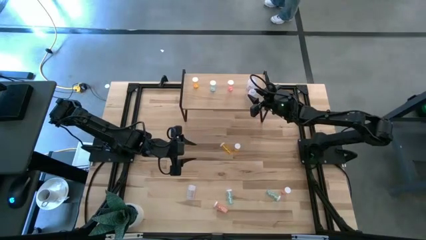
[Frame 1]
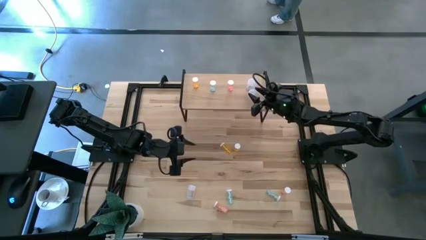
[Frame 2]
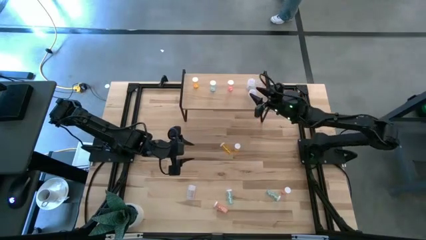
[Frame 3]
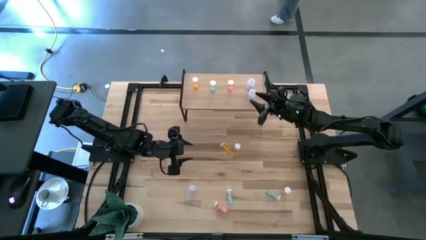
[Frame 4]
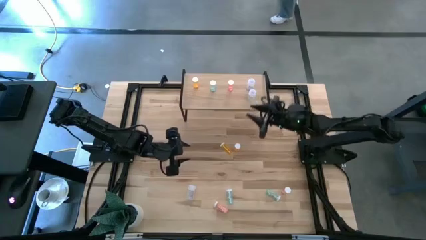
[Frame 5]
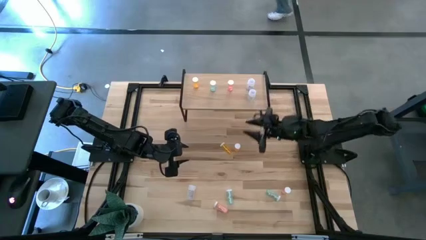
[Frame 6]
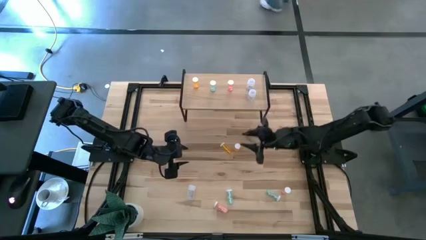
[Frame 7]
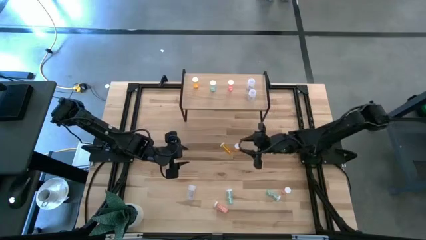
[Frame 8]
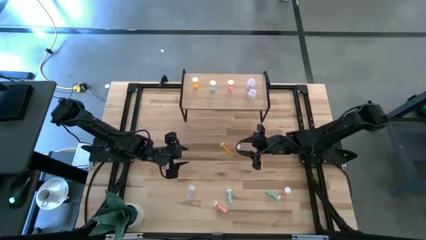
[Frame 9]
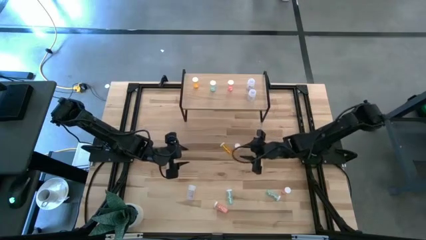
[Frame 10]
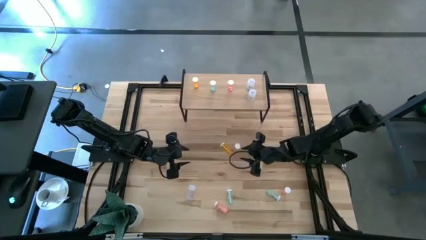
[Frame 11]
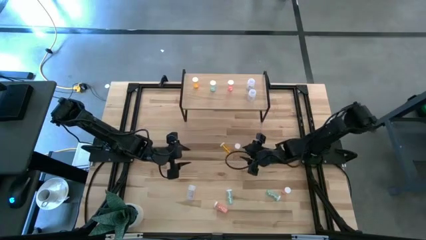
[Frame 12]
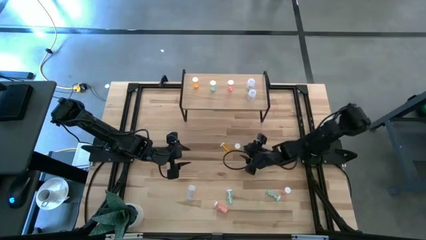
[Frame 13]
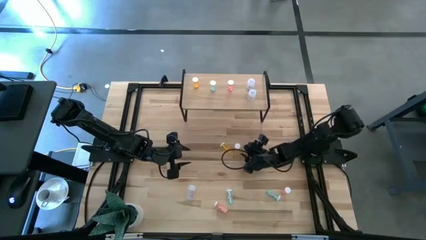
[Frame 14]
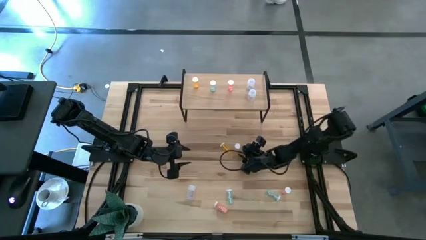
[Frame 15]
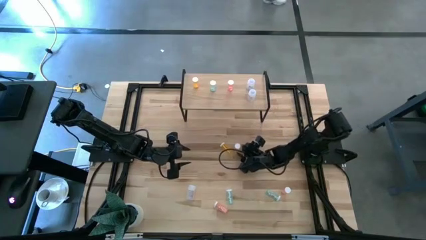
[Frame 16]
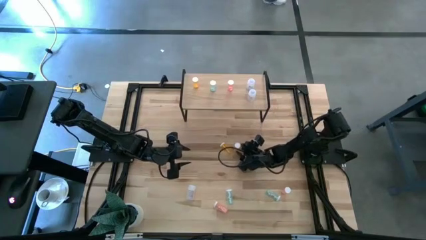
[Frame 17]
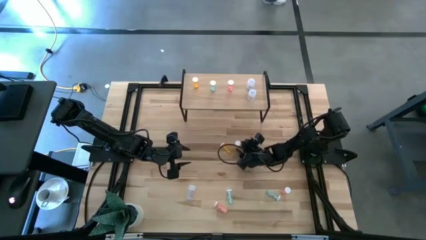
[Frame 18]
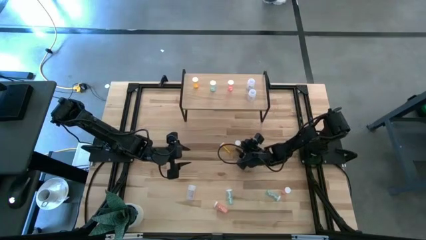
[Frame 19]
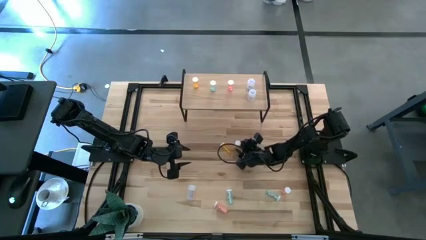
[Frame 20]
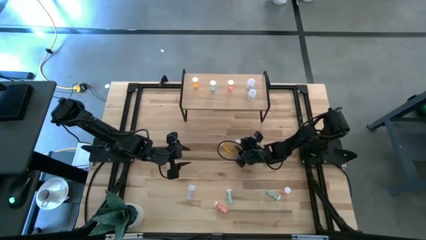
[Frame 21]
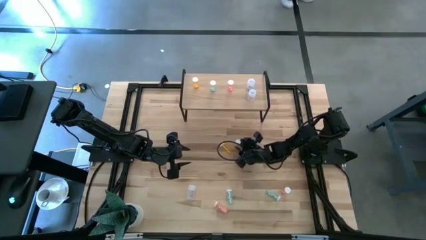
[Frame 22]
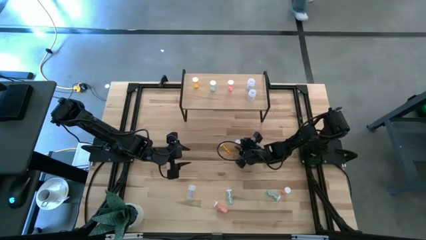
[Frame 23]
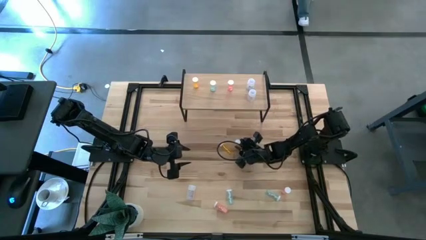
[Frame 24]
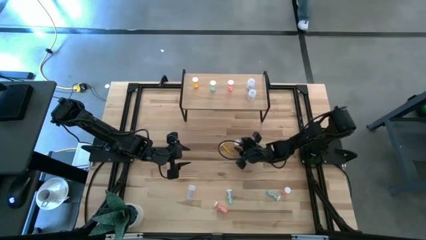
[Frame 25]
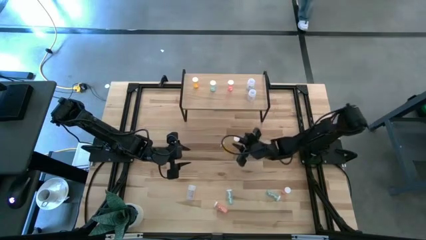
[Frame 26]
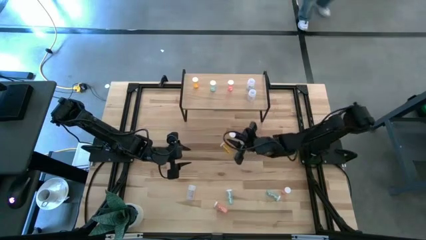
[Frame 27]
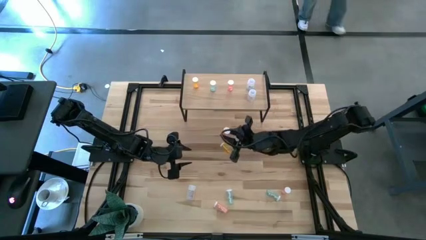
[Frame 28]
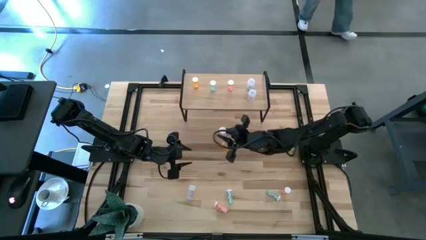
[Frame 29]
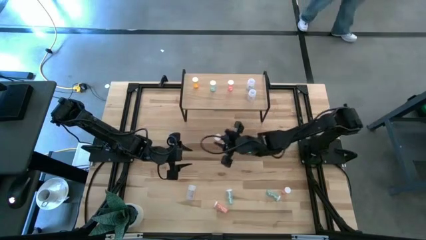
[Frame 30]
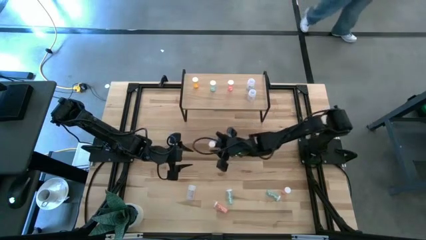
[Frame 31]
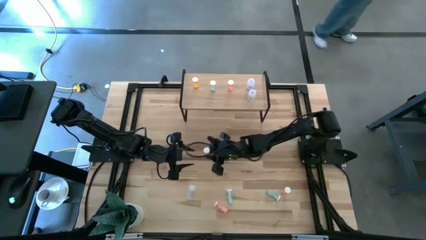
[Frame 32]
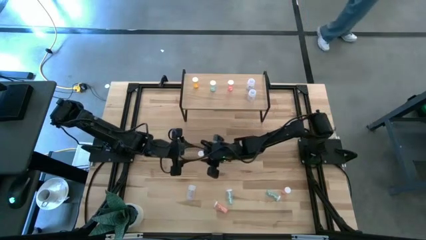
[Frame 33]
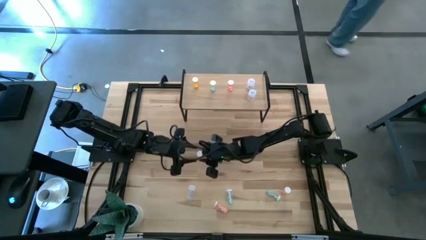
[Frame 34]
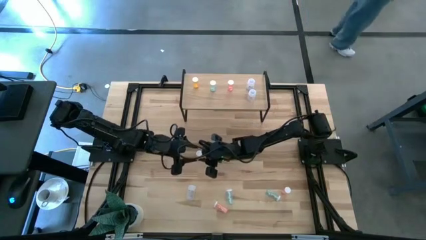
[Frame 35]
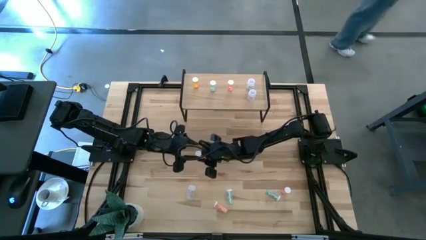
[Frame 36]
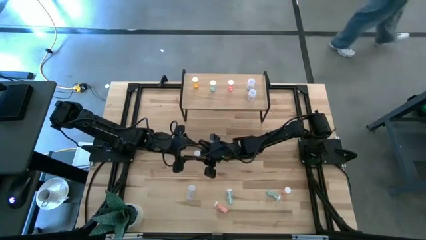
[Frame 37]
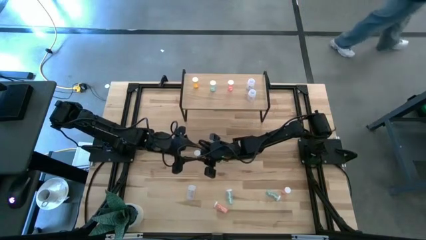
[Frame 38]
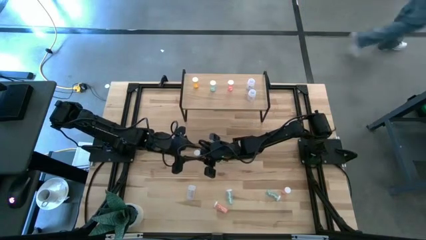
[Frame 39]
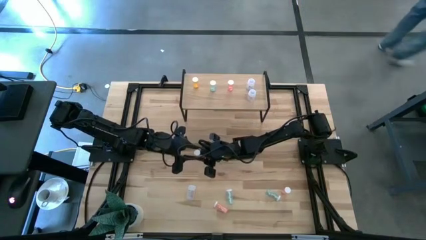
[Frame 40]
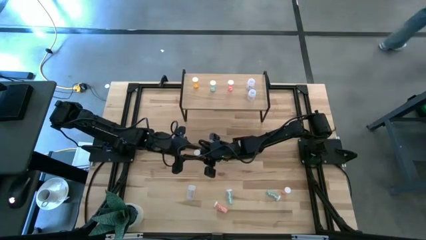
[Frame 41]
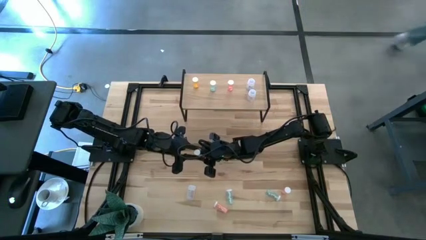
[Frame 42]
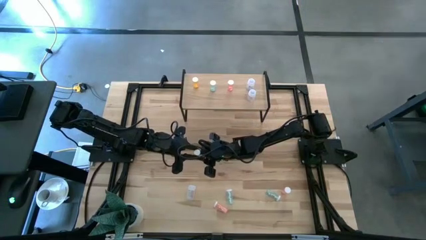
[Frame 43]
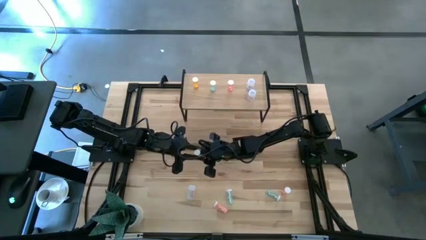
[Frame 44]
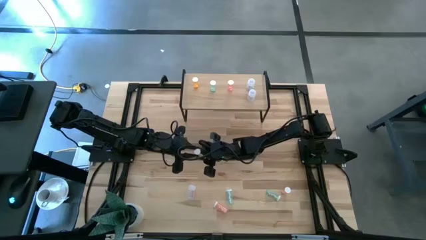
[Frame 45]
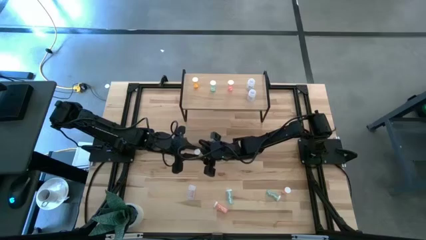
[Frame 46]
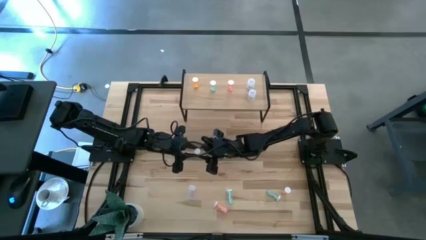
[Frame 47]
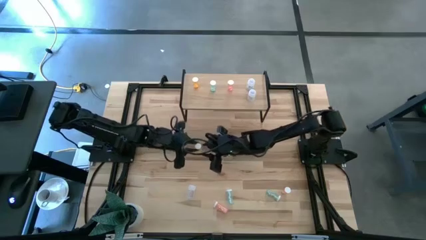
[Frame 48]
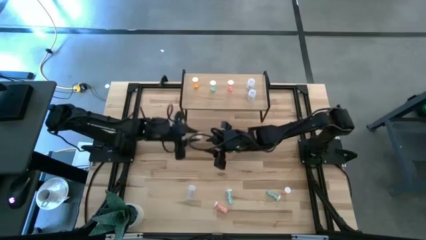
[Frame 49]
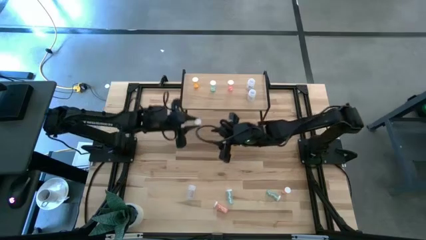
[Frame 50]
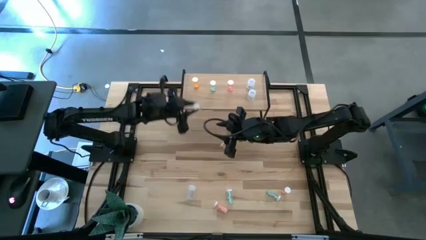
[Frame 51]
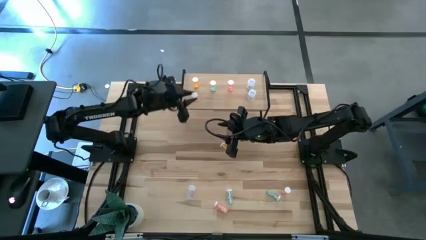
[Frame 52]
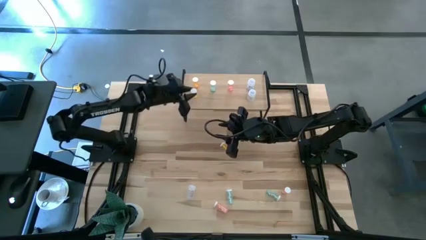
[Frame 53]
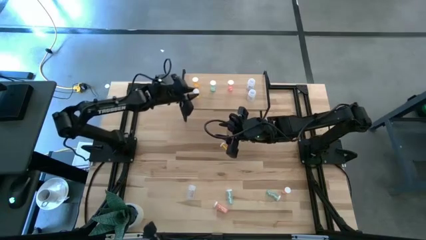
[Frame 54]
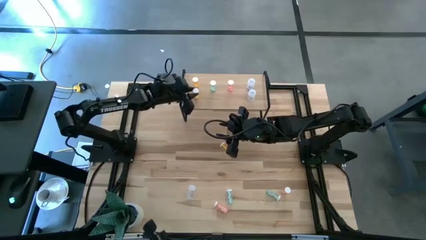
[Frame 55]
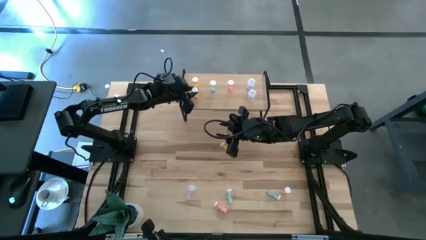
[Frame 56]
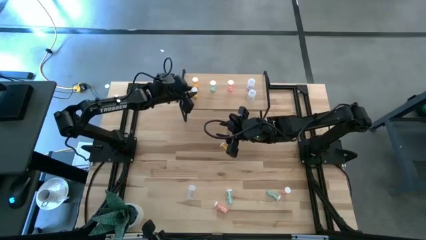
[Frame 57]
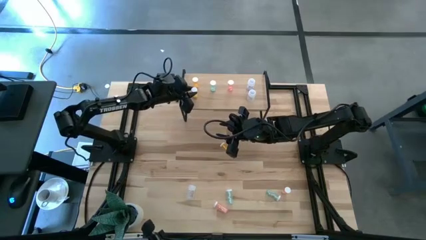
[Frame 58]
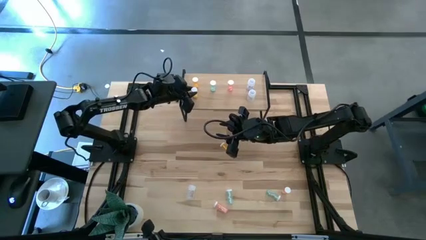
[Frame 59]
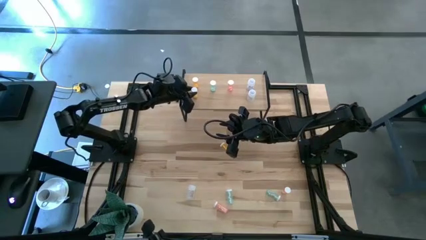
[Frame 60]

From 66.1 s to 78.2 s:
Task: Pick and place medicine bottles onto shelf by color
Put the orange pill bottle on the shelf aligned with the orange pill bottle

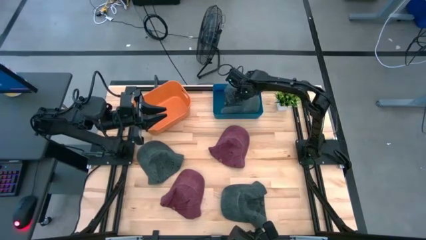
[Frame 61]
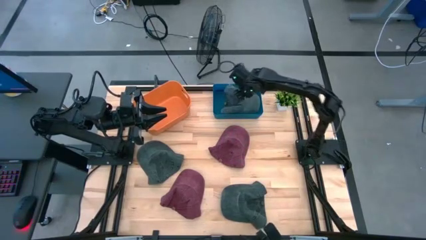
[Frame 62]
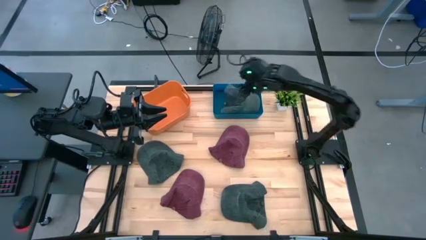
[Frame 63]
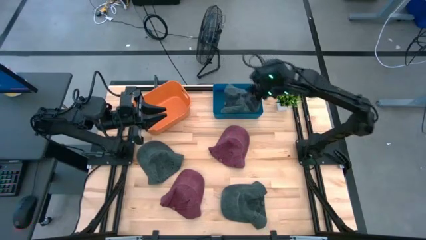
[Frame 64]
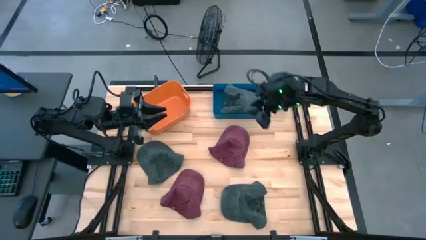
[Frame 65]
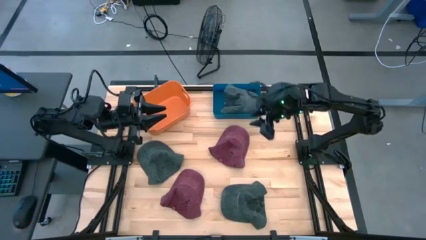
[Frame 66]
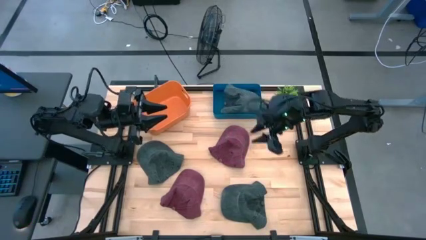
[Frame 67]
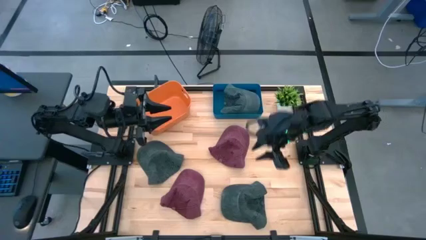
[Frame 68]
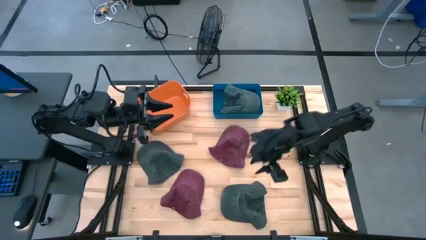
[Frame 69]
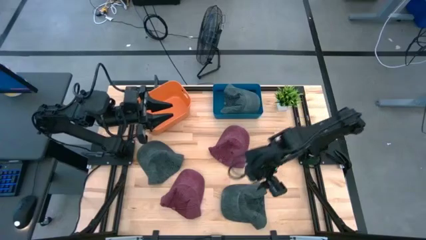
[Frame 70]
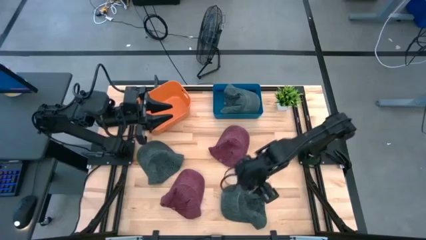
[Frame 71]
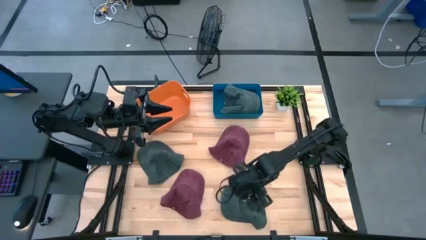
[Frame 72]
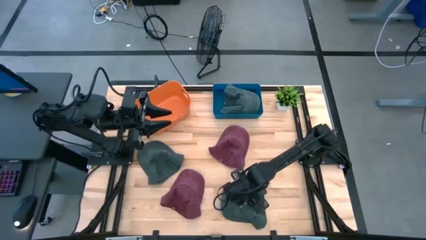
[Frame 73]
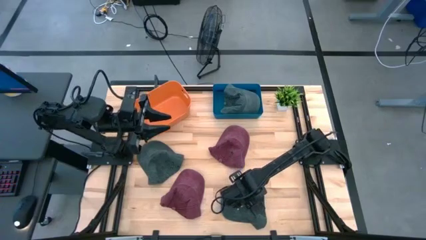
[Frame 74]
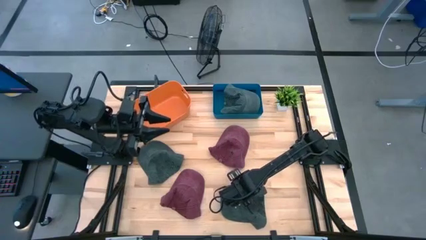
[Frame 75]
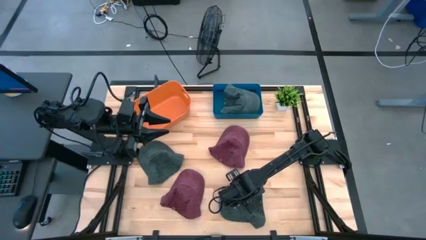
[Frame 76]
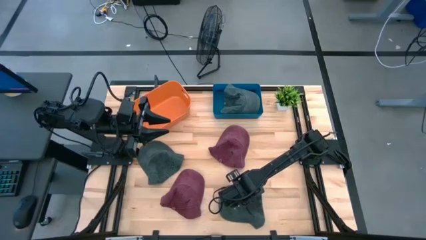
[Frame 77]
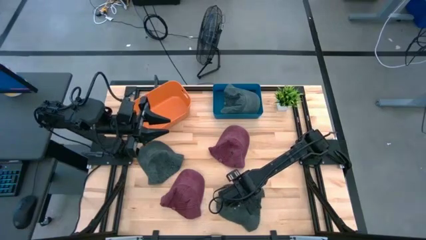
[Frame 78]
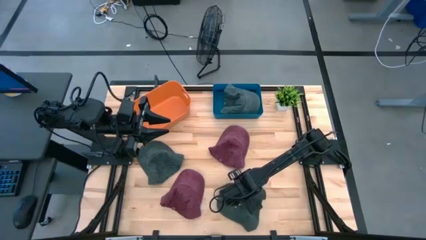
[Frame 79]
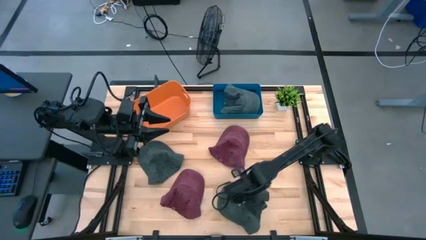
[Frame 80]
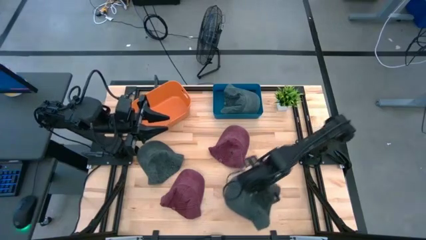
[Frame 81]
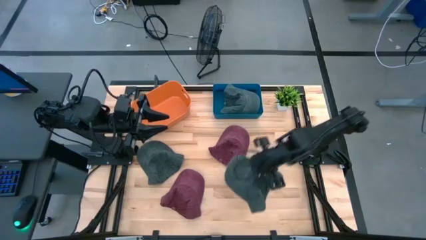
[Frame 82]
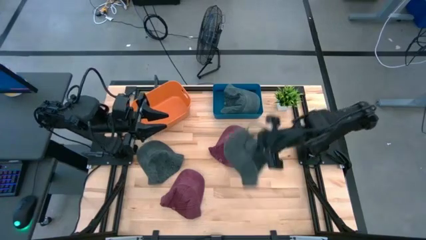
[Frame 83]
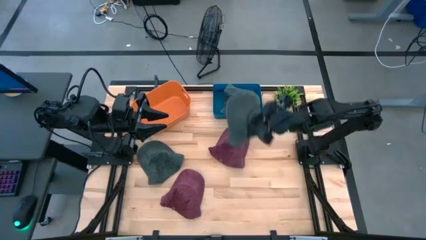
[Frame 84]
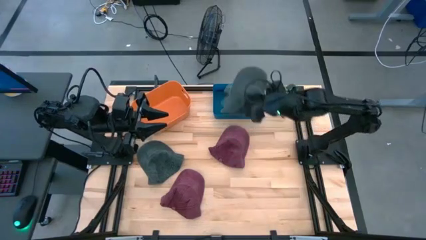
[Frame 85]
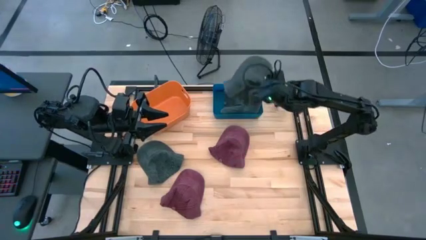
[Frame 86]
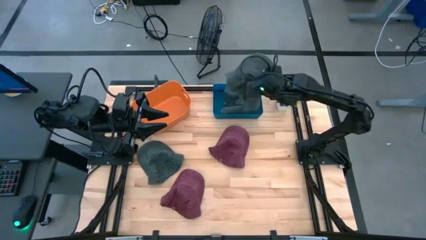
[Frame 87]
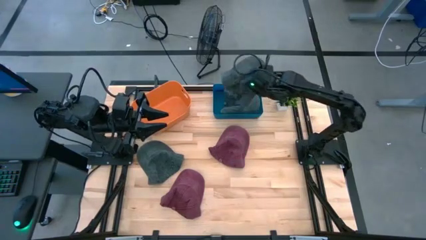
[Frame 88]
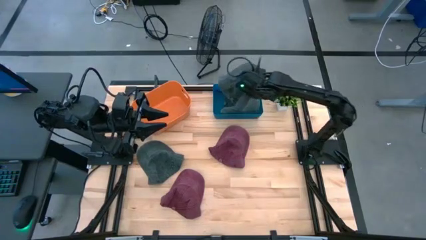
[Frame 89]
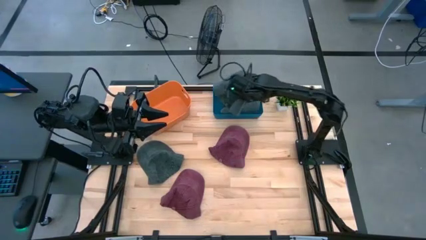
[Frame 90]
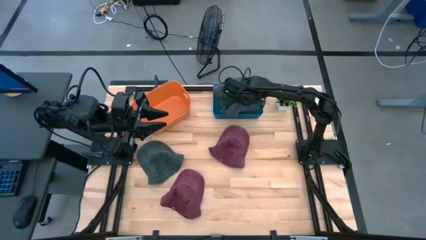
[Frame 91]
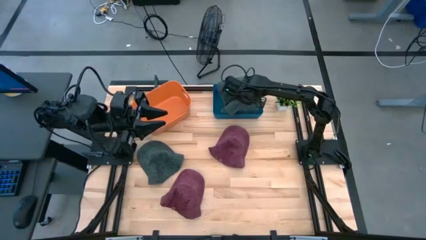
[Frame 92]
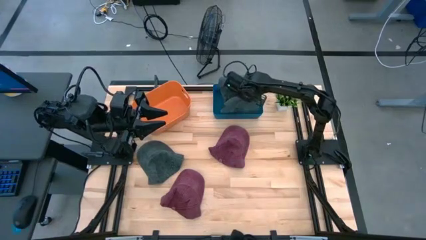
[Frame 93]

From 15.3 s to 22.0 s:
Task: Pick & Place hat
Put the bottom black cap into the blue bin
